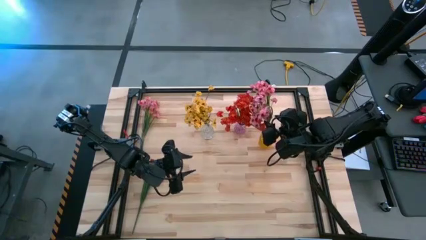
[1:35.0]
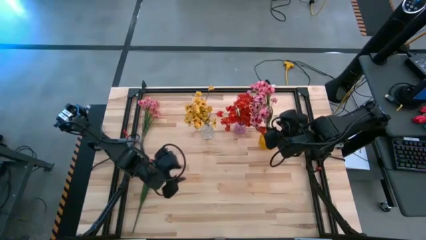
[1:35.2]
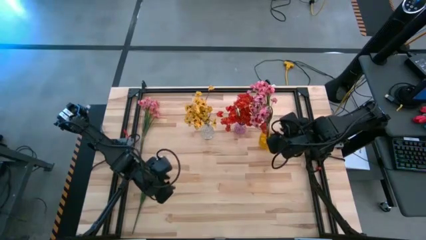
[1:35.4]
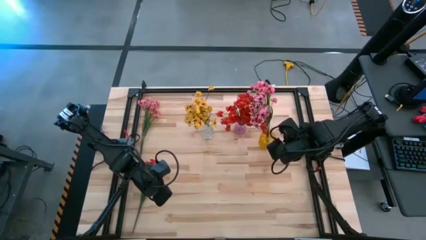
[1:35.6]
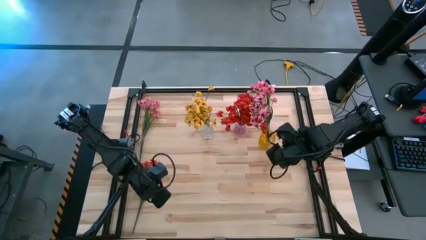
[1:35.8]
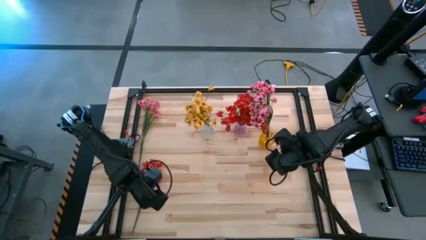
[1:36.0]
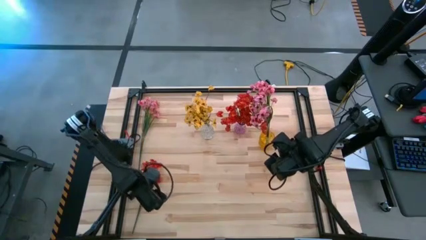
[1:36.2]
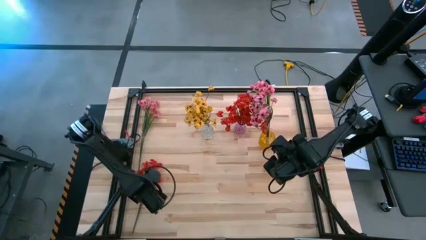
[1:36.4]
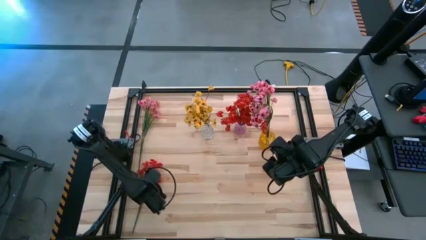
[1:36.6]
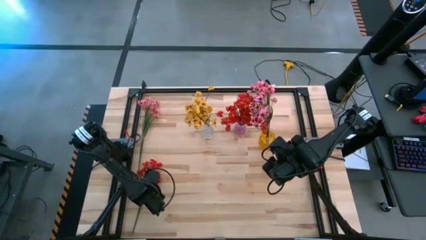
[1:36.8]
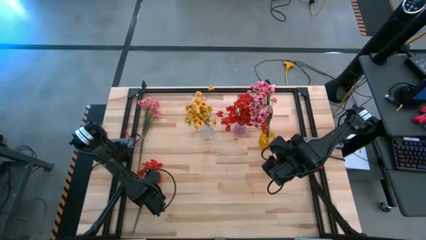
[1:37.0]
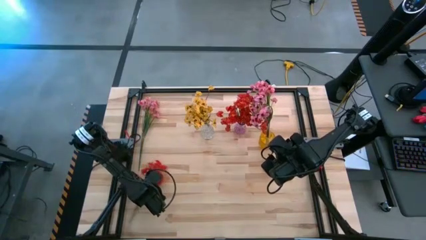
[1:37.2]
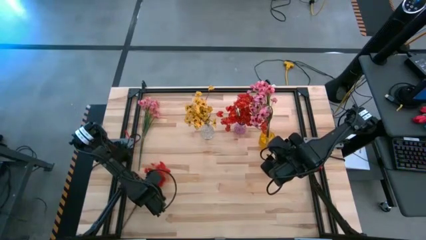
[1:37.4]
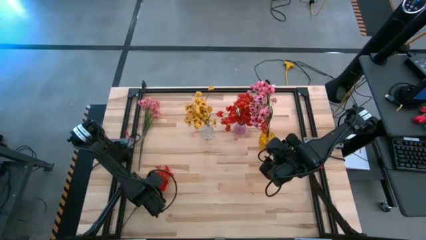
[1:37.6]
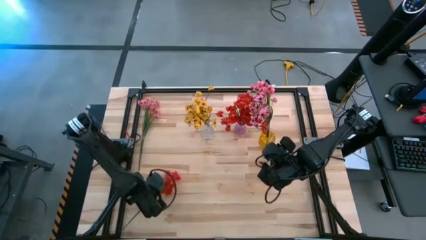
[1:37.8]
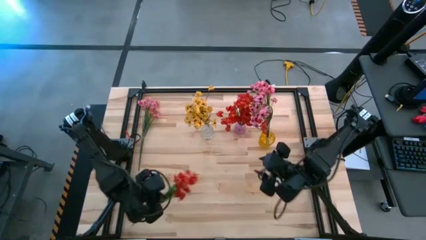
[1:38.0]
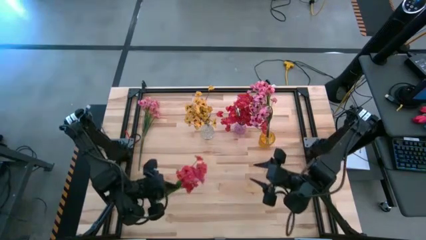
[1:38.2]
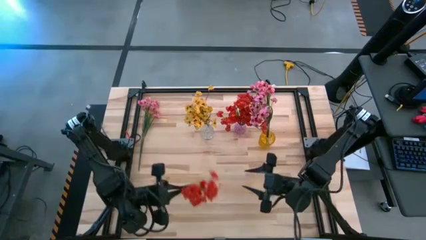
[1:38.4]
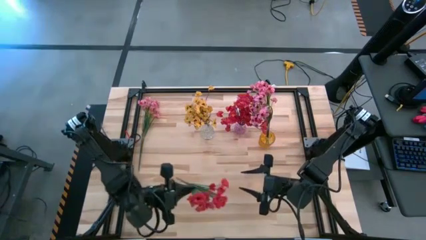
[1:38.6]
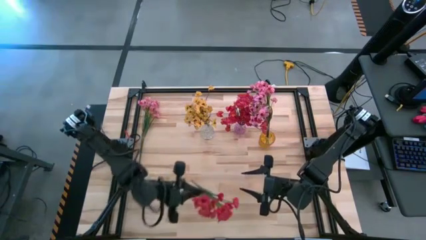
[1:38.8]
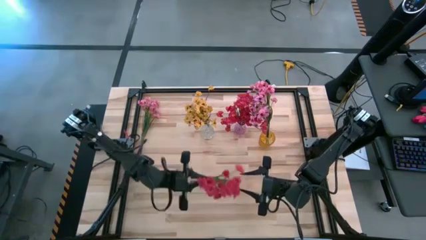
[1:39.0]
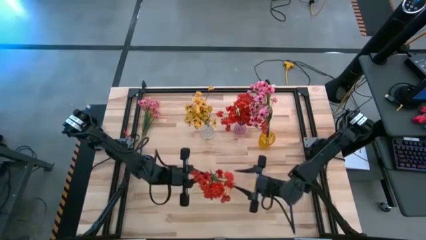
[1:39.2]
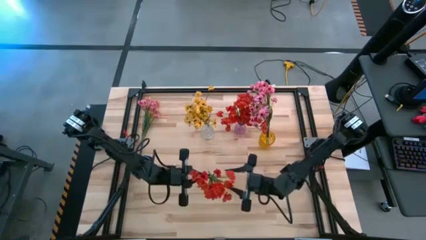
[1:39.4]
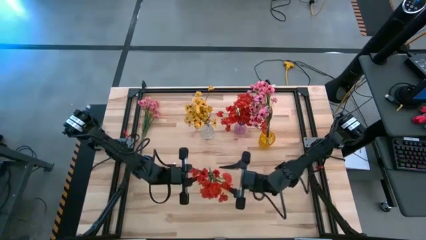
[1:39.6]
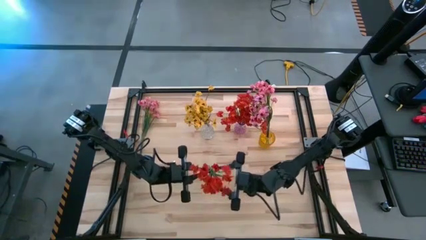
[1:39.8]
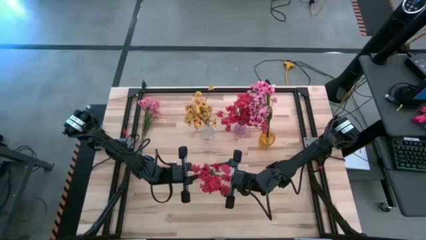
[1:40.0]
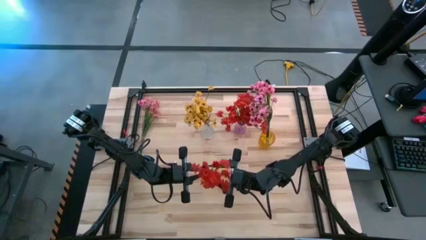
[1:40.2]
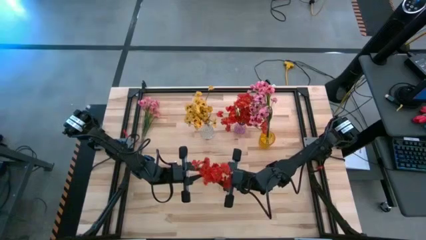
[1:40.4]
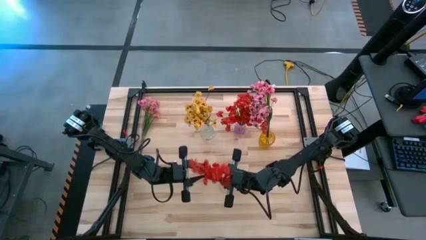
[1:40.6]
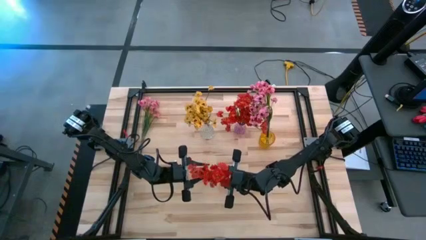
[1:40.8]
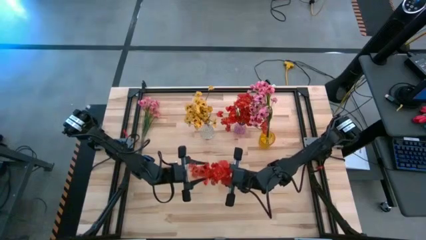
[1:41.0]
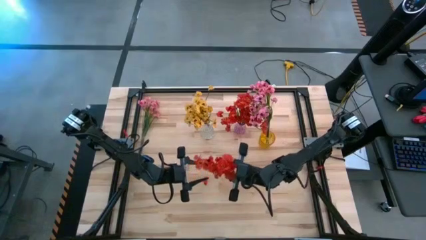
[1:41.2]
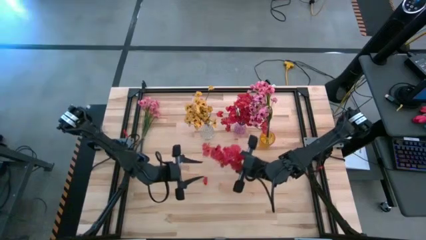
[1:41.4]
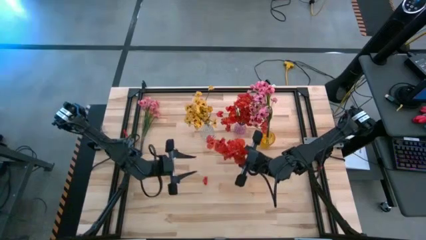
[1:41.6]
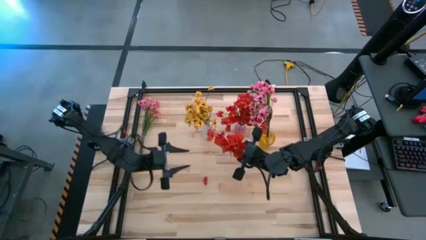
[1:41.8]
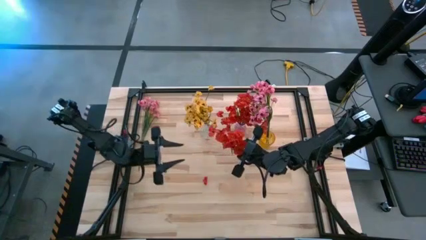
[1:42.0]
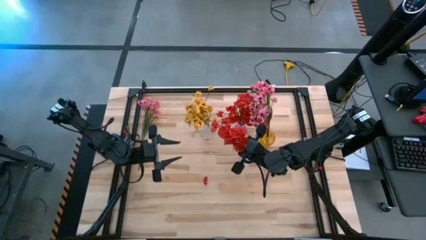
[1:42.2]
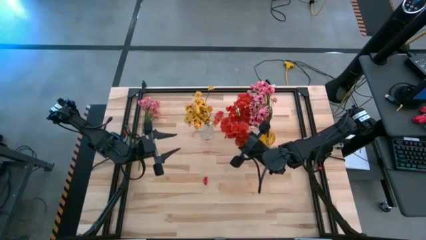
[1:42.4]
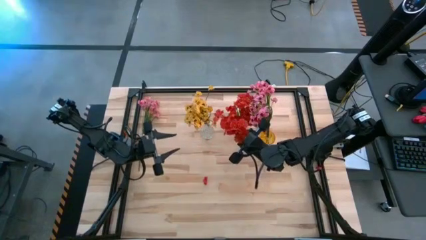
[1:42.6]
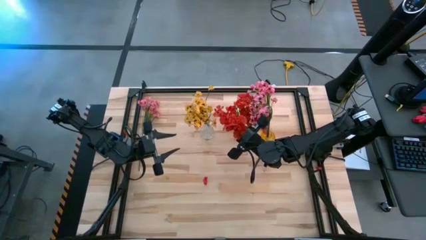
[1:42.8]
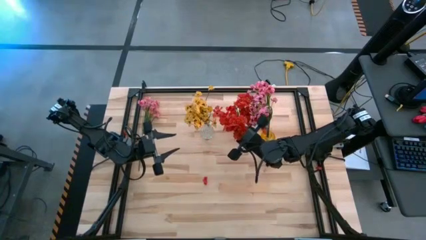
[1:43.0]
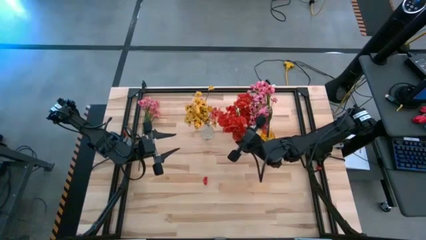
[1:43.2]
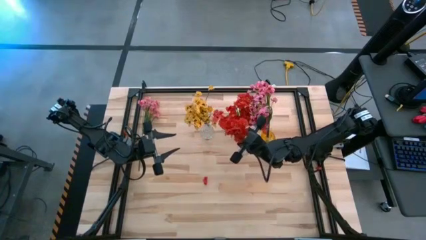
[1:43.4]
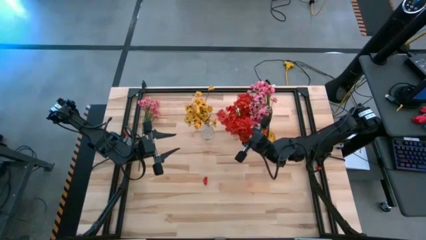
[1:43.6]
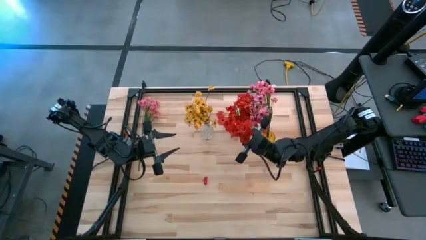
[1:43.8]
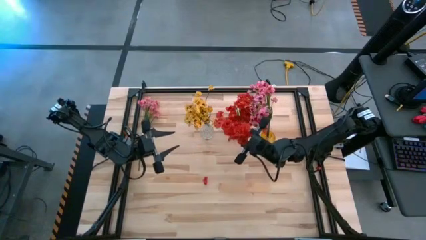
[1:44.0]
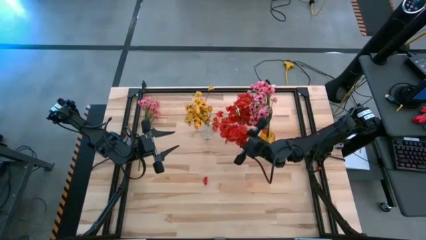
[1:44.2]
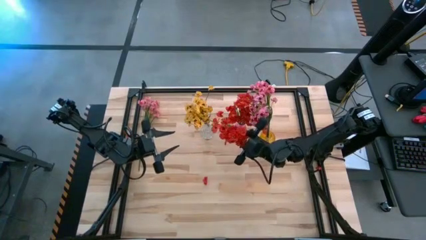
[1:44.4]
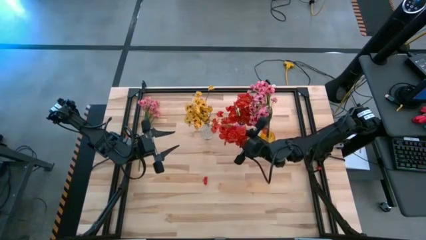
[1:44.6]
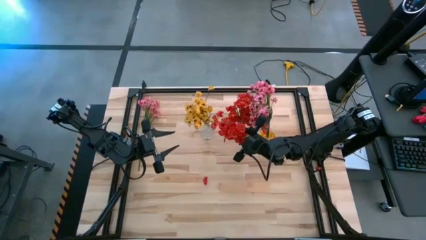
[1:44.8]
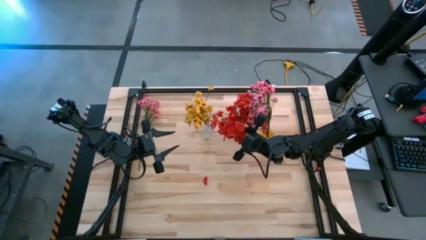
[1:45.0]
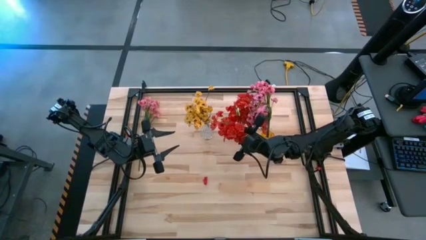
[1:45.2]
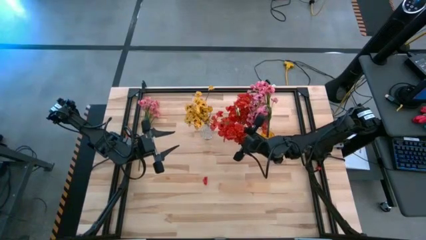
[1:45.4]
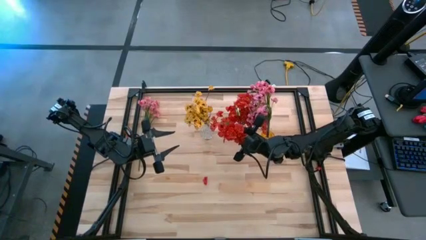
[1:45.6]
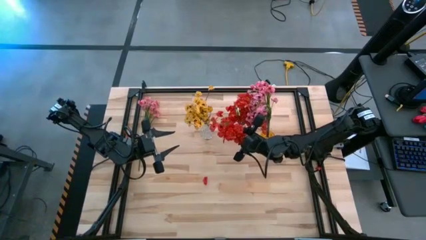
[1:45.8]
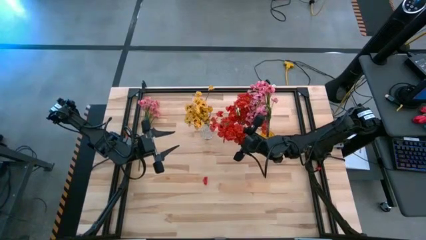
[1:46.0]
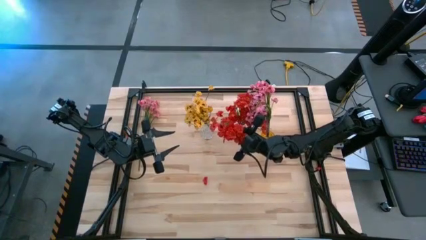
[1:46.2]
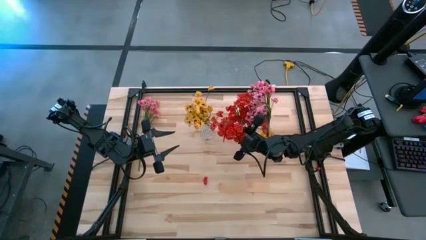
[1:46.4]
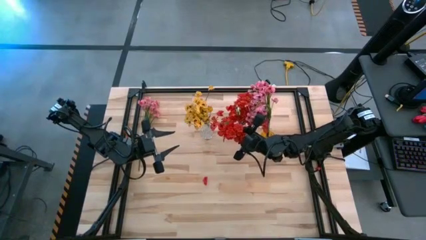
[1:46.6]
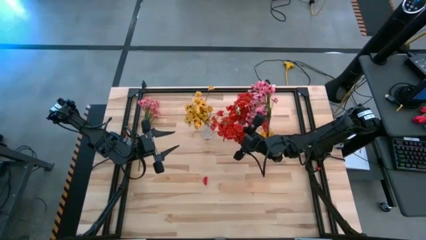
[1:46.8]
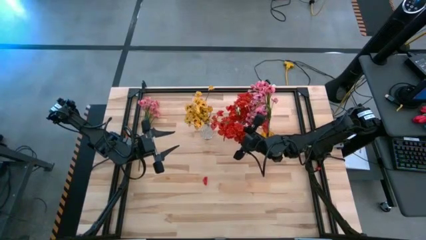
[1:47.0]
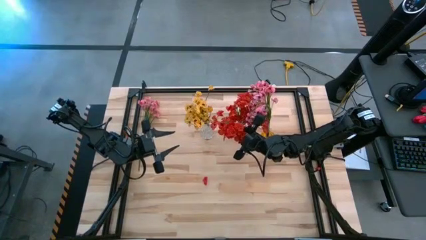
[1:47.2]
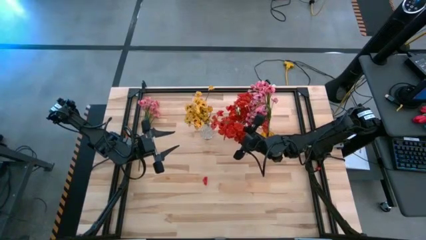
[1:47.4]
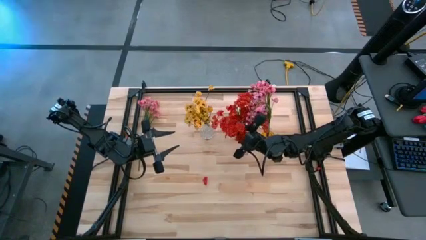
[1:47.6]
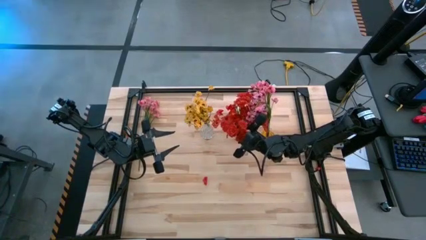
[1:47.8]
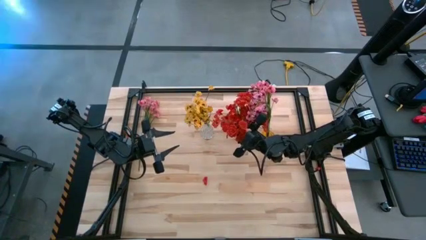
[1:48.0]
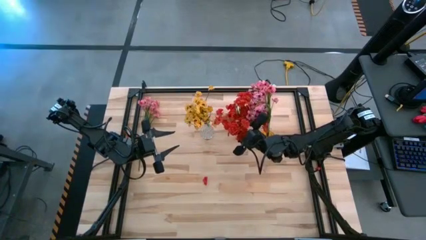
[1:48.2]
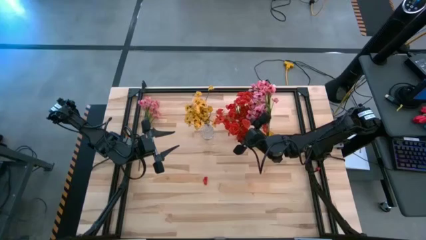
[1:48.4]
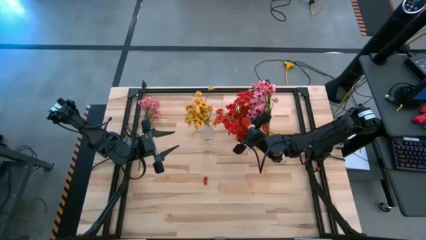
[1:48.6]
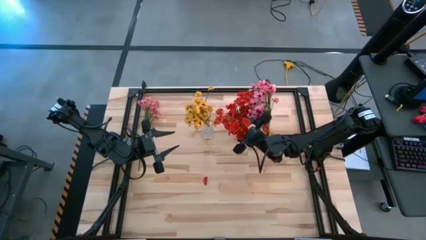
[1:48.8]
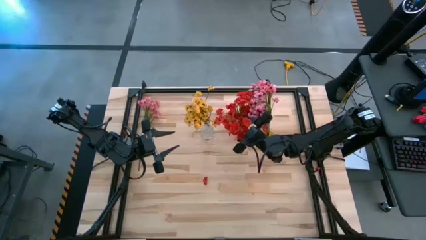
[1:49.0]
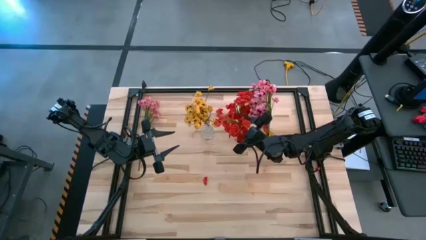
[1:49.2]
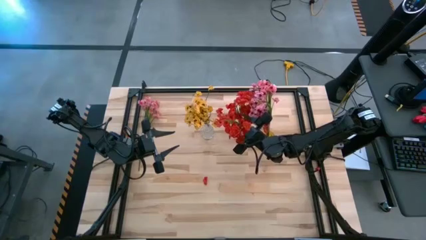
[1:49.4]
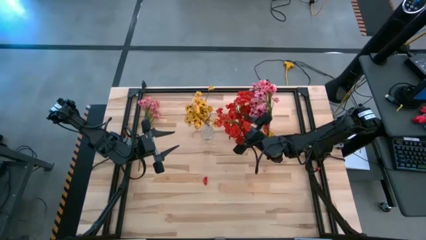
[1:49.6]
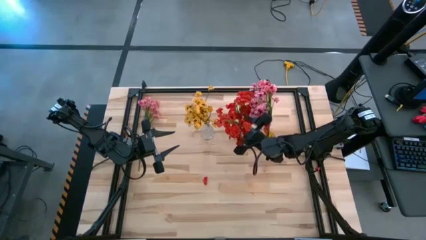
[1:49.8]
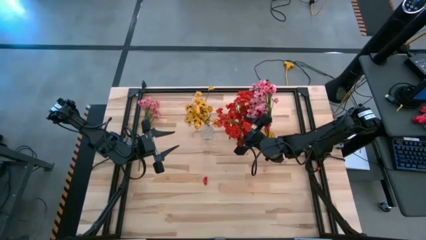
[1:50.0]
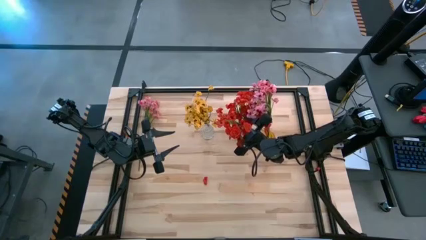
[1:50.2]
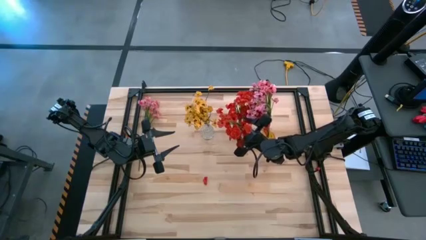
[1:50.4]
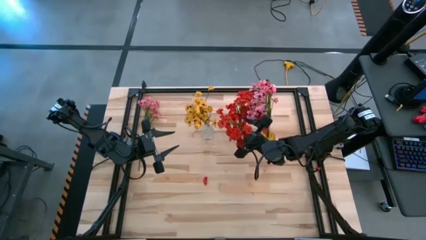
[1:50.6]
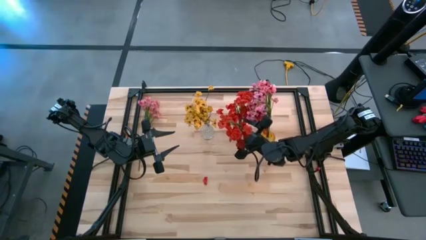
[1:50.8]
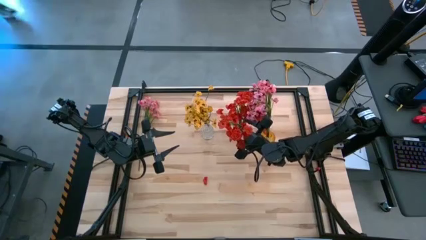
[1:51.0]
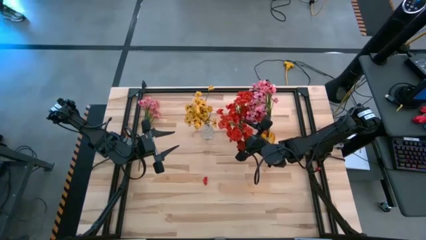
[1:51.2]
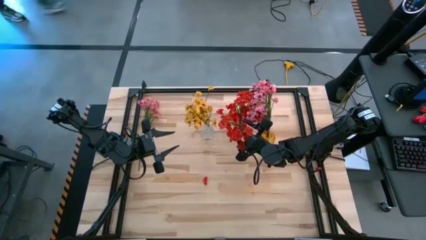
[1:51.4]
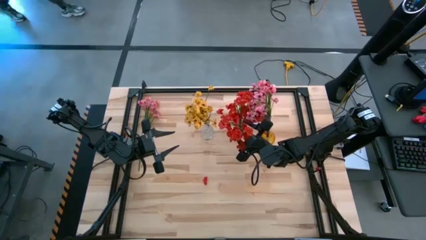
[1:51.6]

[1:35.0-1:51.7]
Task: Sort flowers into vase by color
Put the red flowers into the pink vase
